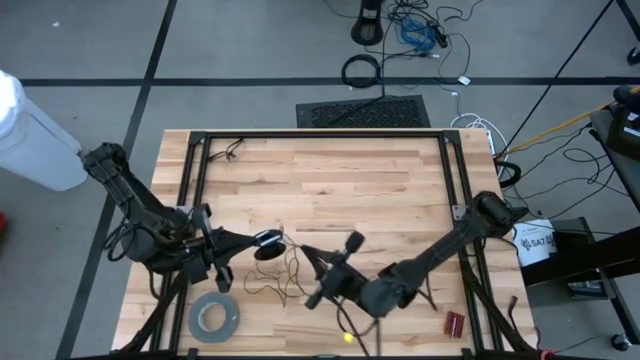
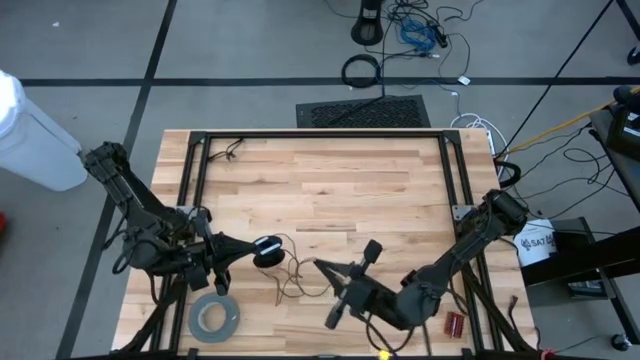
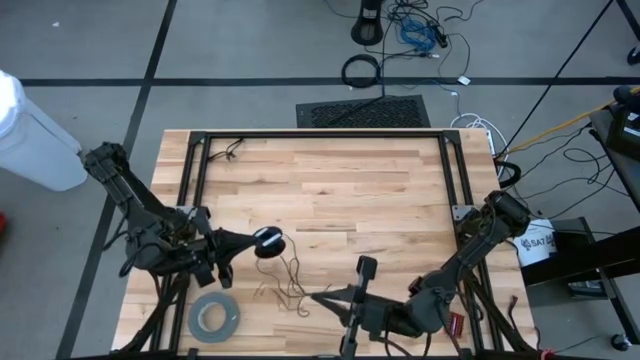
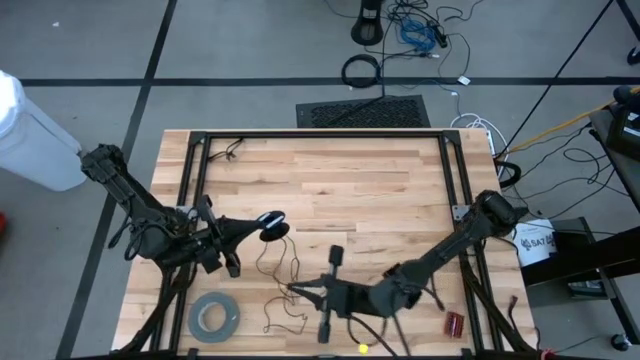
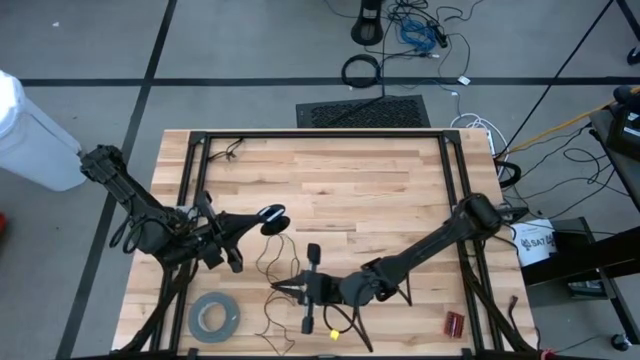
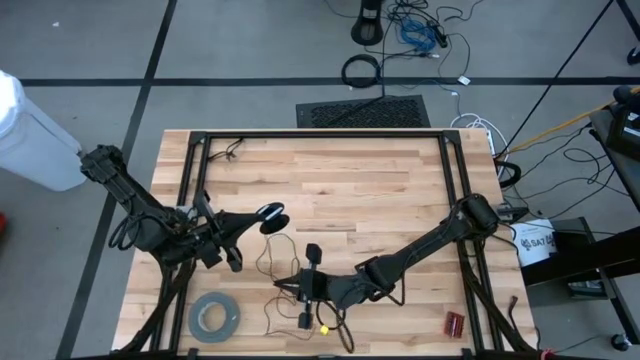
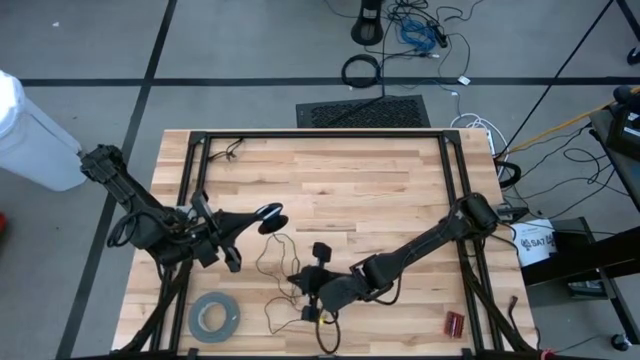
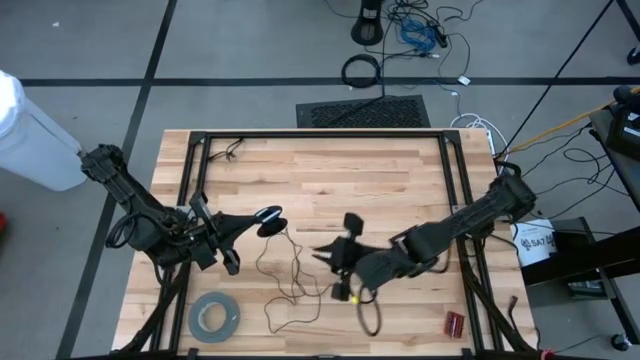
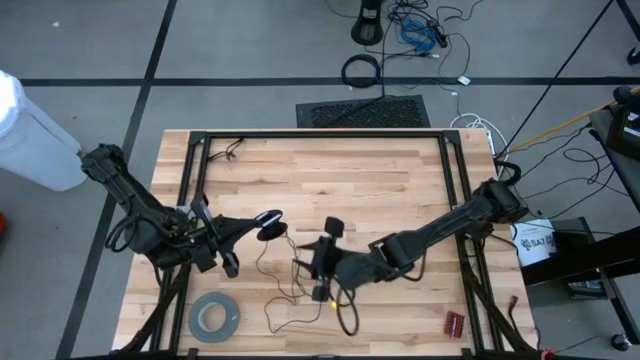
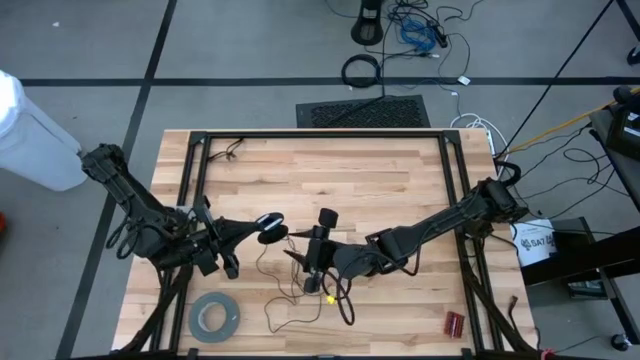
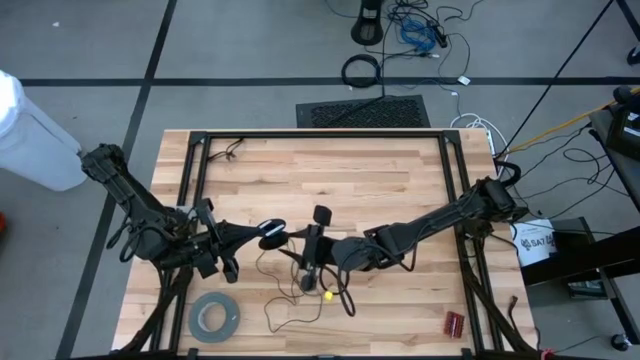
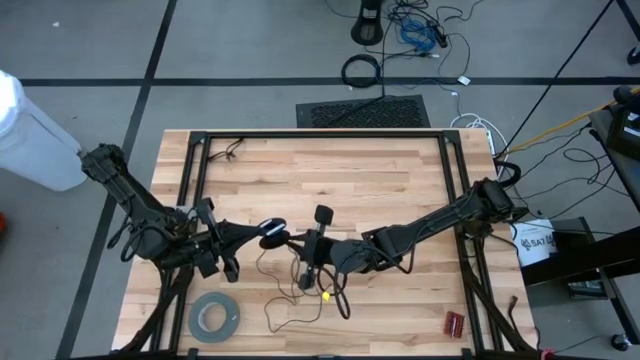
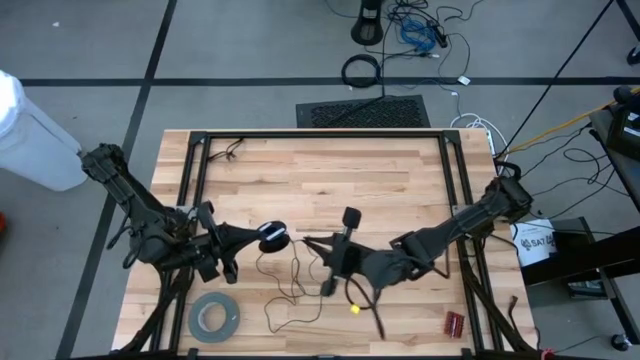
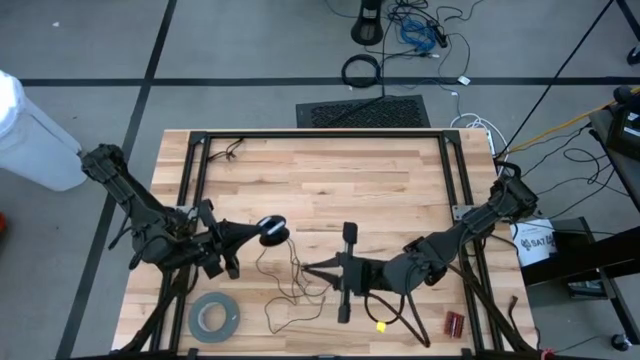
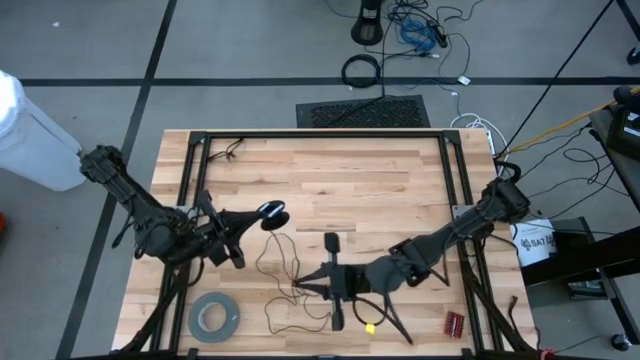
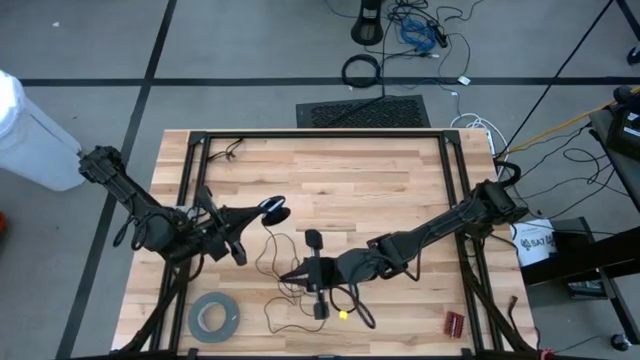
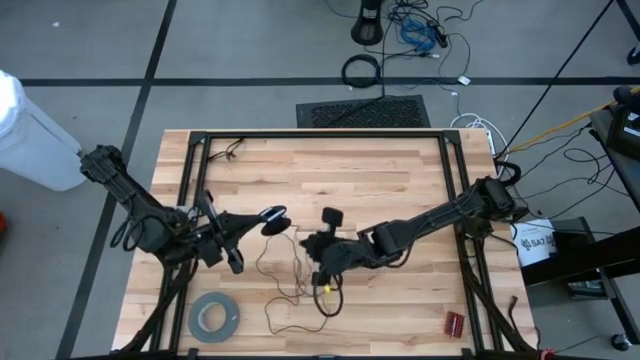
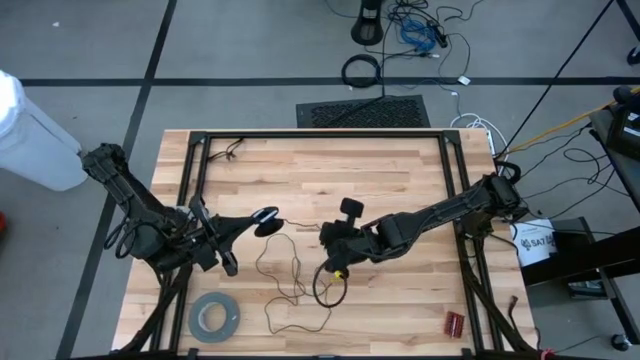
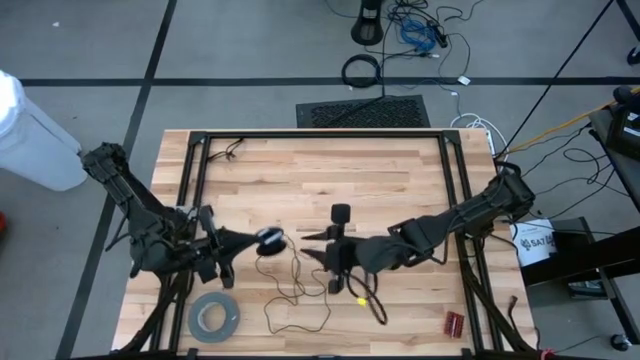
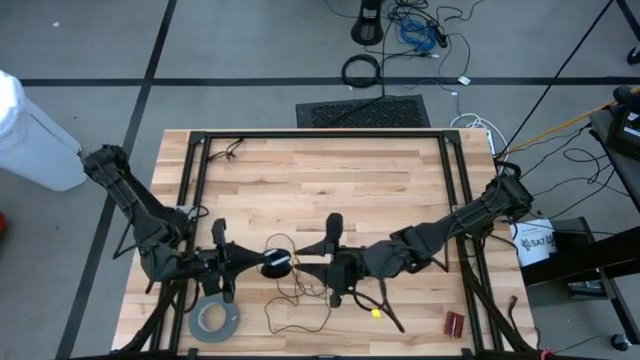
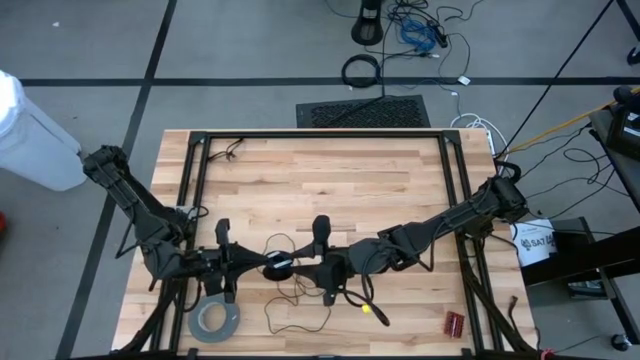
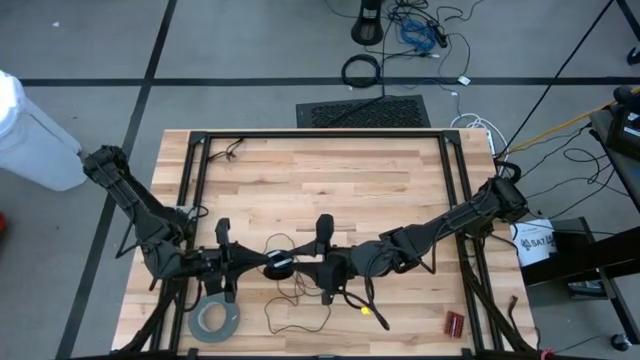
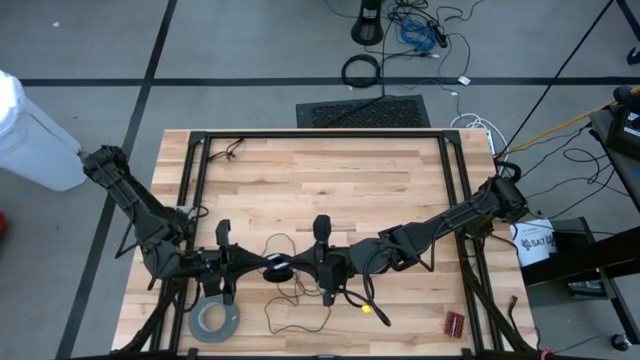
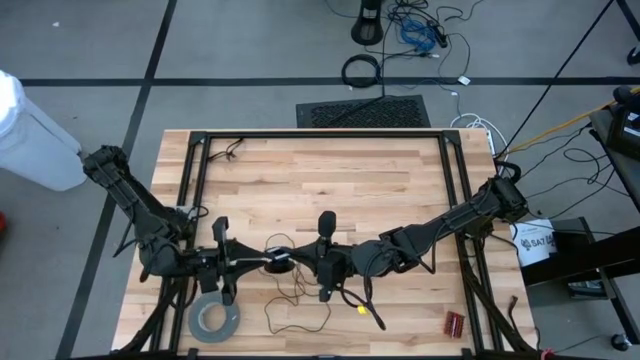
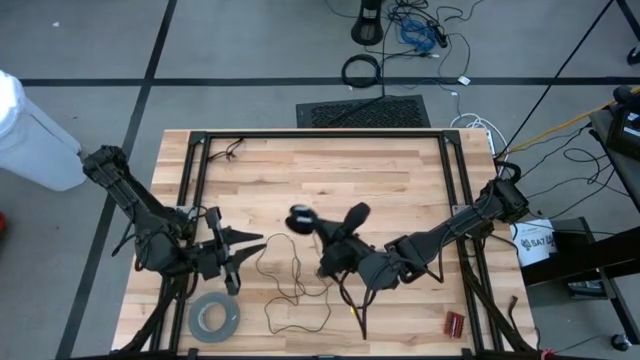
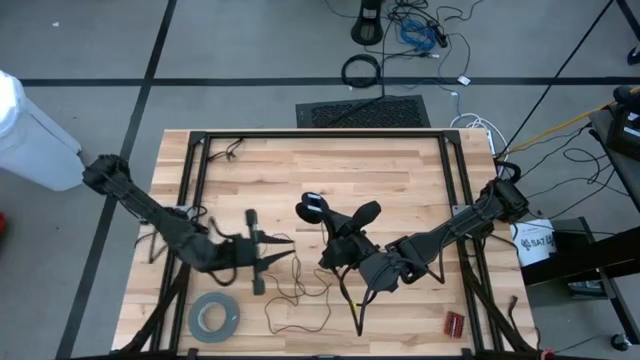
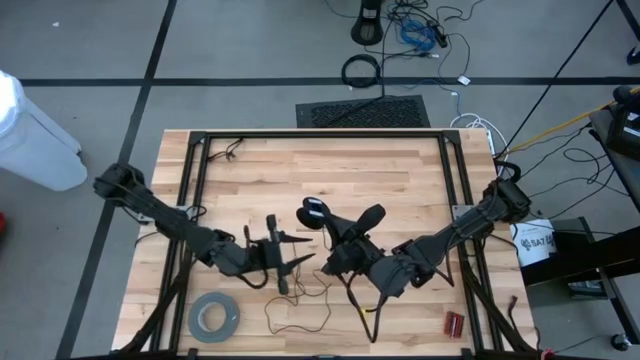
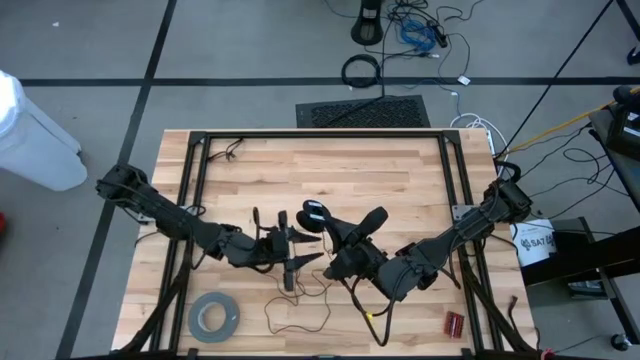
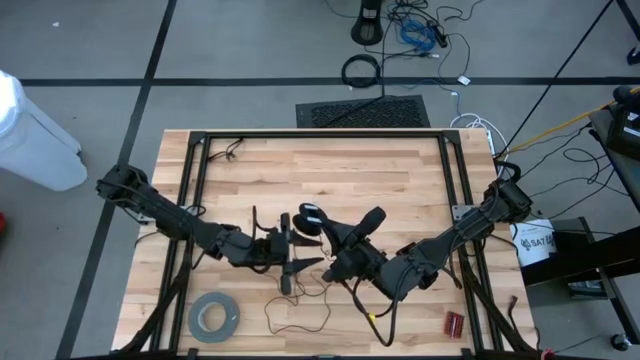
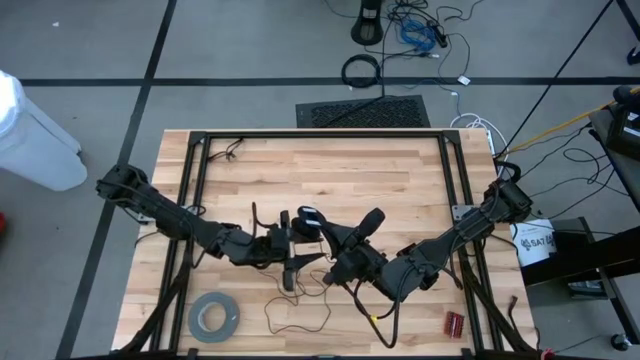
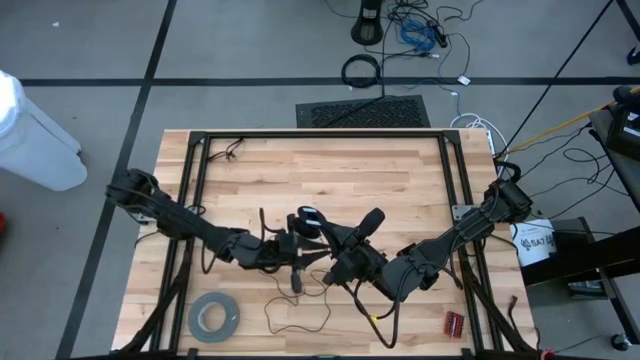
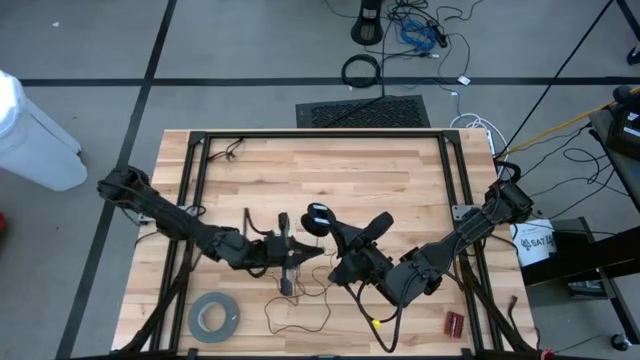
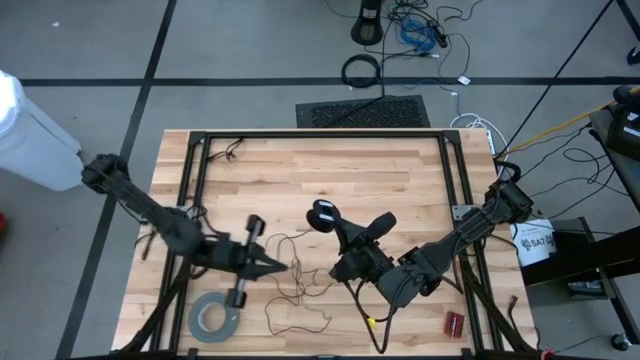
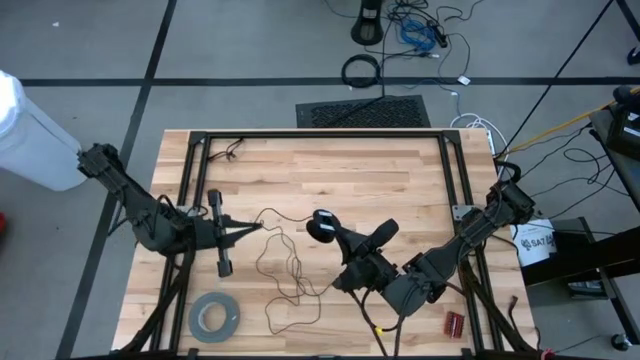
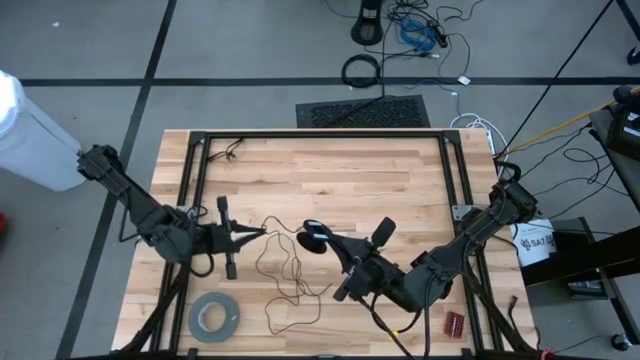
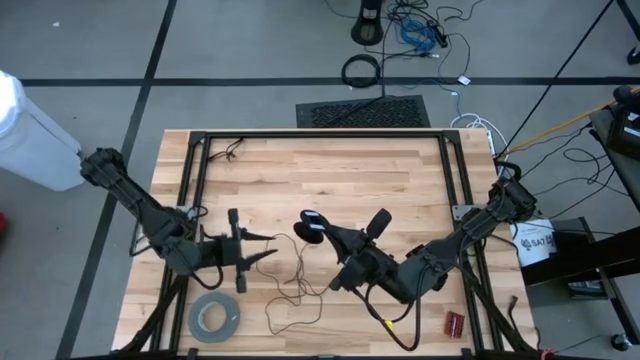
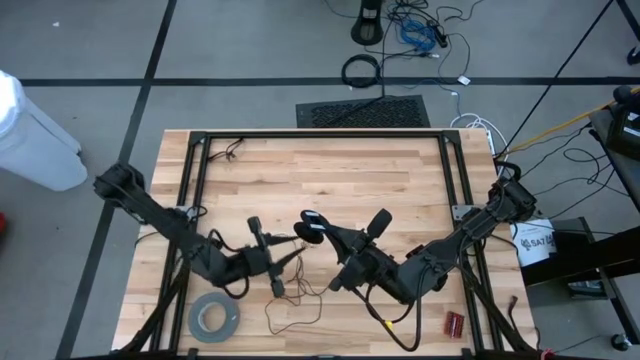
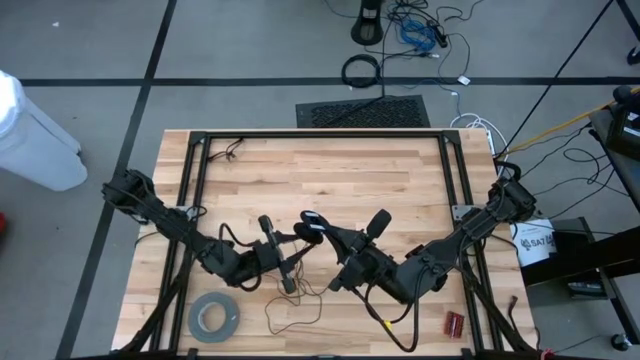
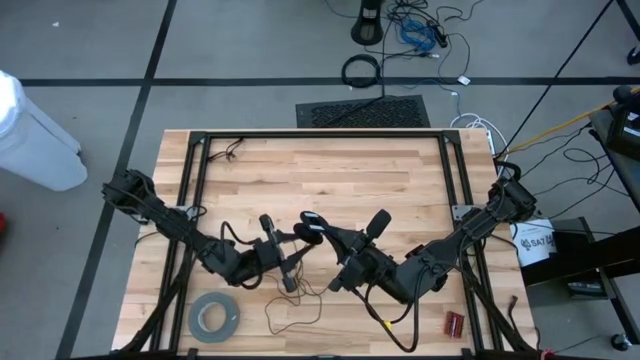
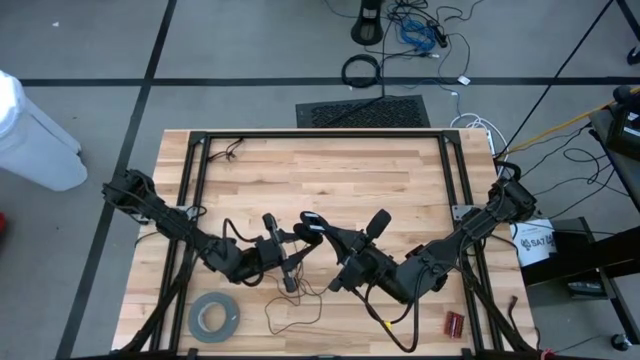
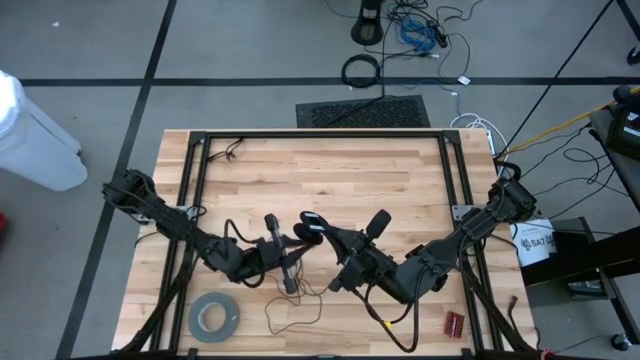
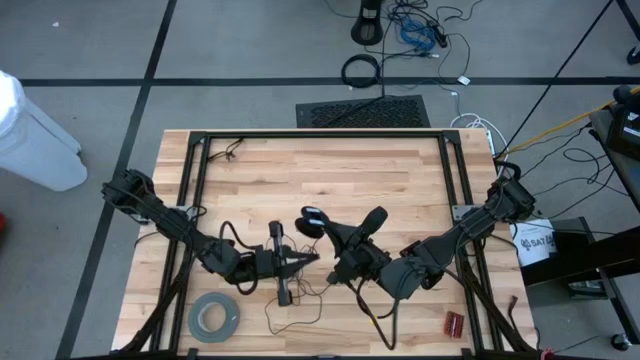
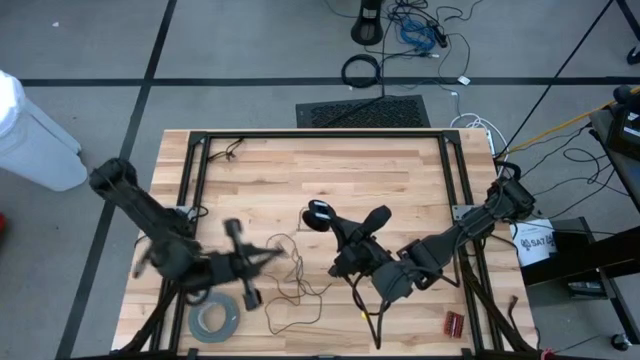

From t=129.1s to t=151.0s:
Task: Coil cords
Uncoil the black wire from the spool
